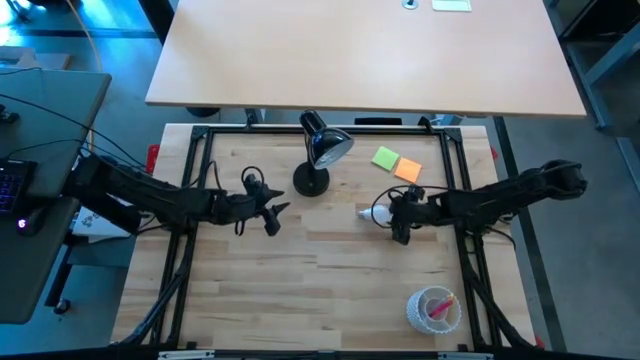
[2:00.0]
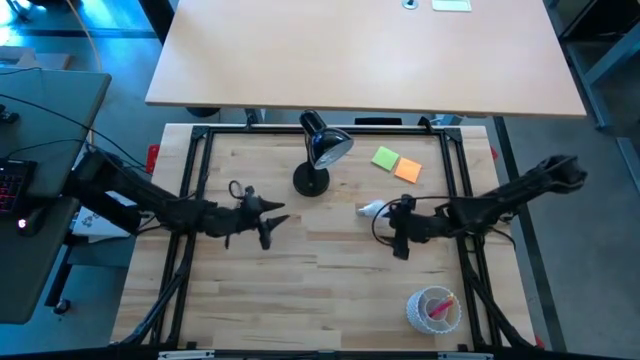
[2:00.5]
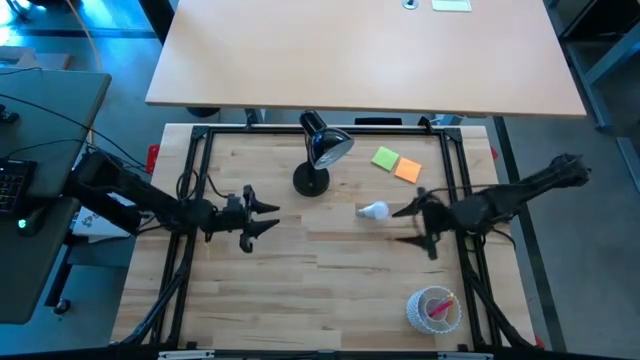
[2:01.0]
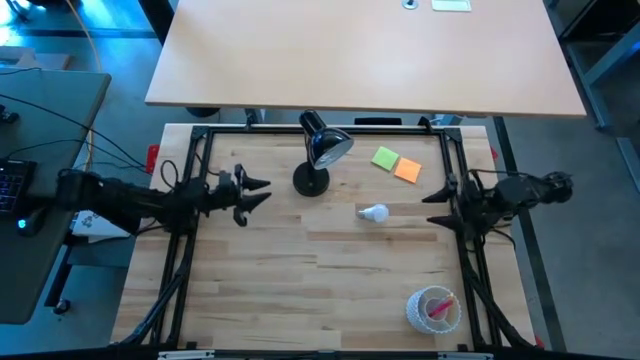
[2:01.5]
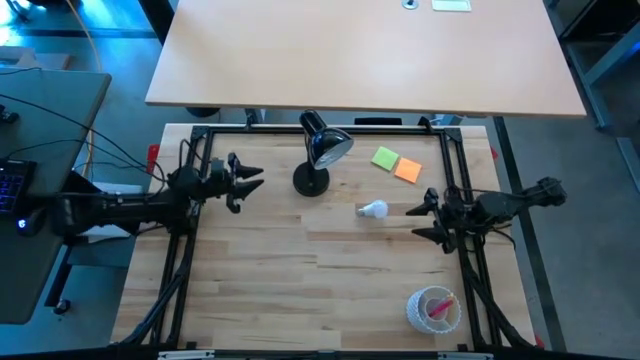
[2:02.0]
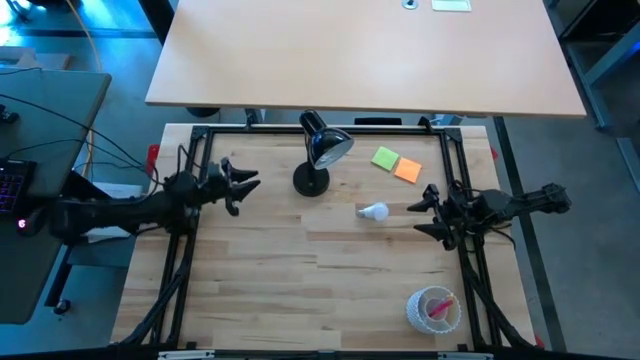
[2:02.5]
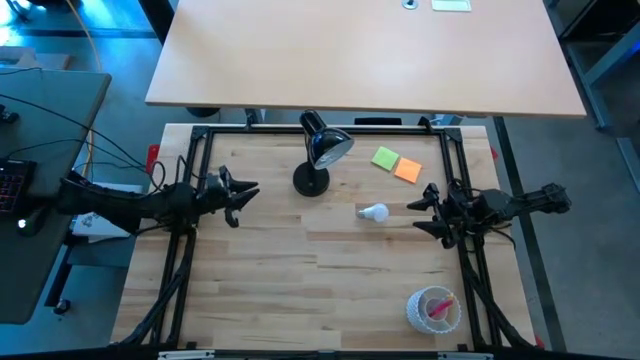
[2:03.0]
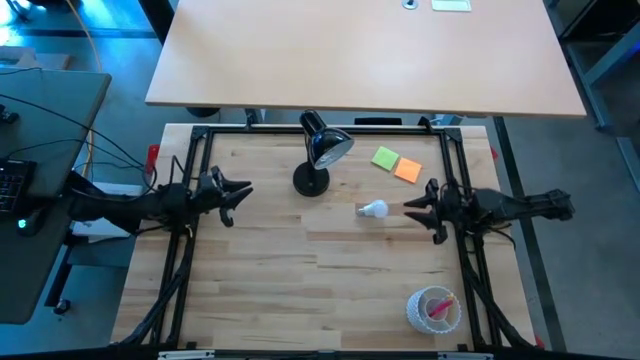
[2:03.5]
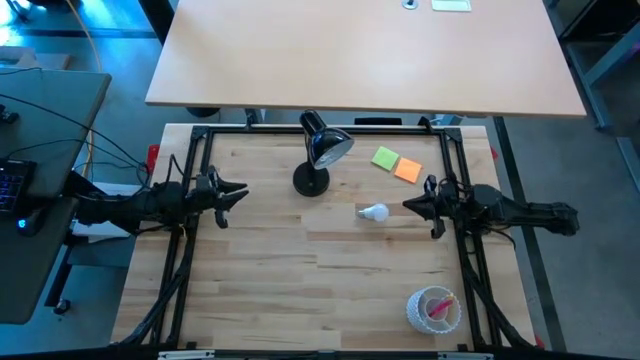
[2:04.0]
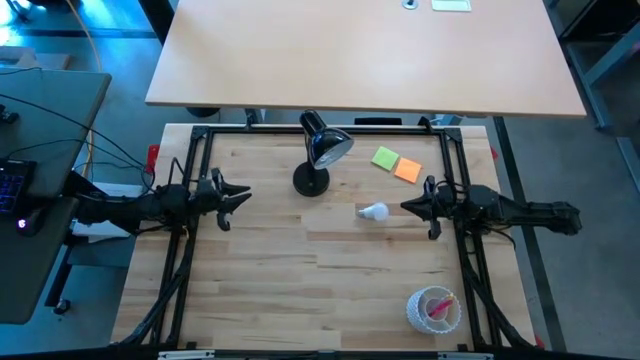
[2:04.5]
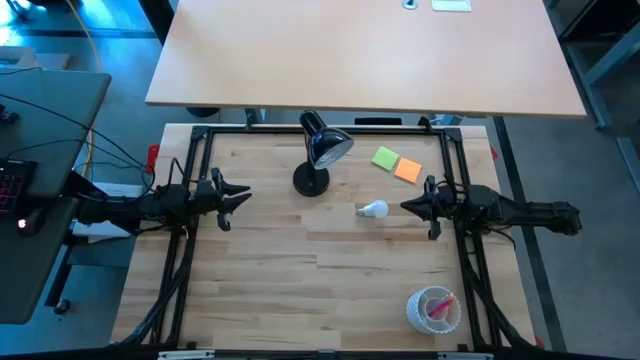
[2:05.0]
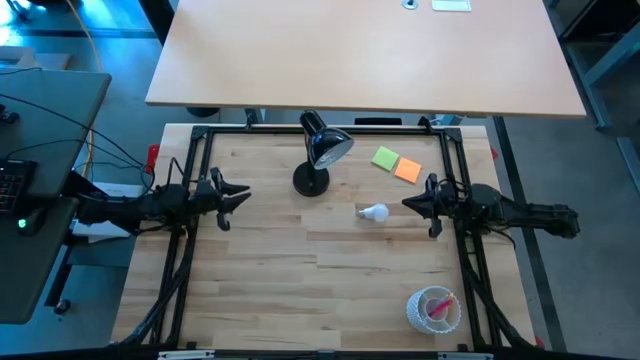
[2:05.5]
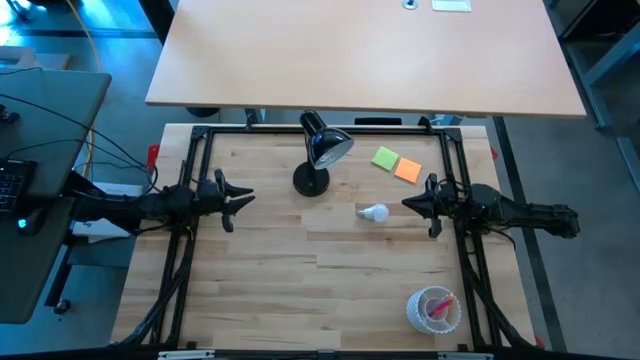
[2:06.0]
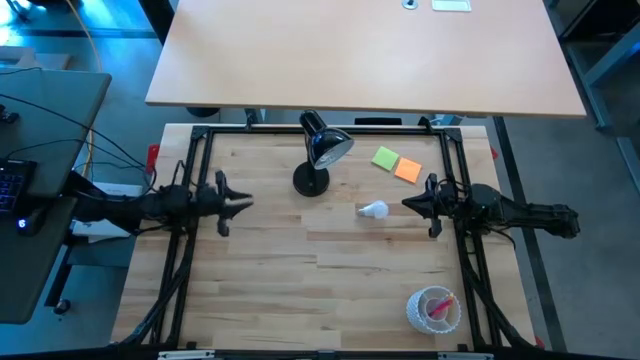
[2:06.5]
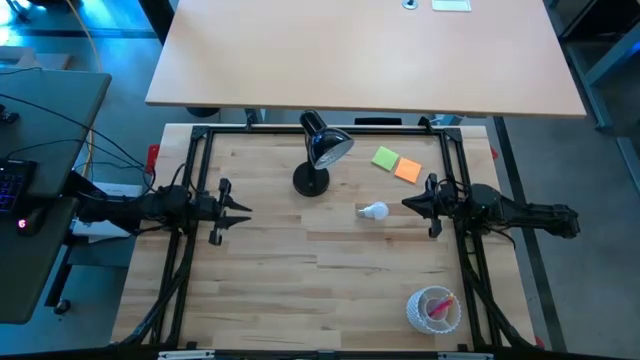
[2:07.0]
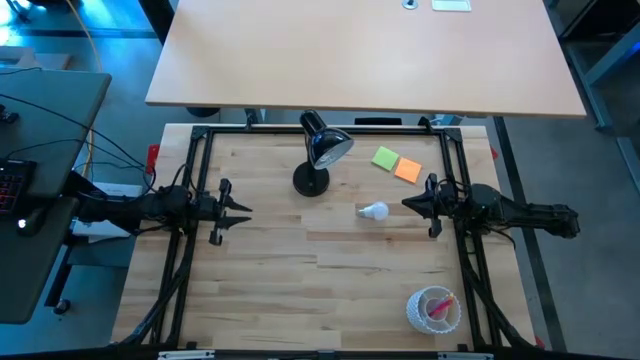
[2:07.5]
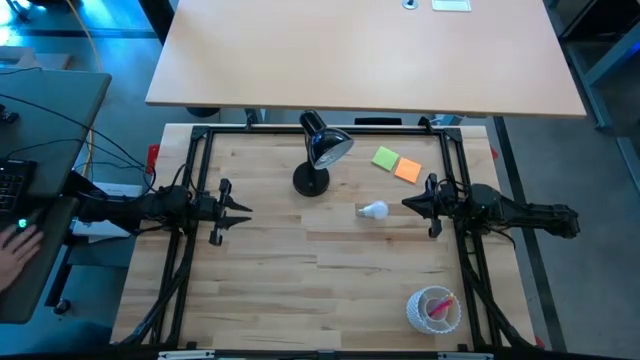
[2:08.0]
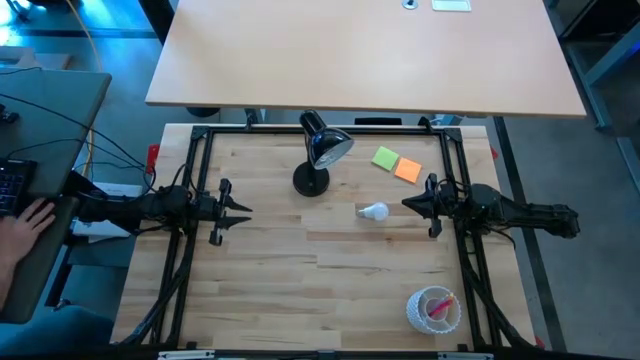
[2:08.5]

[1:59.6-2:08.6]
Task: Screw lightbulb
Return to Home Position

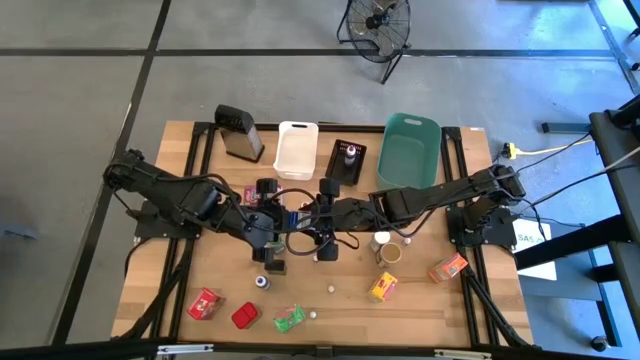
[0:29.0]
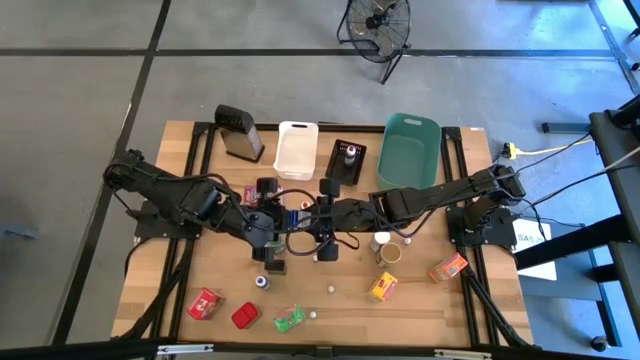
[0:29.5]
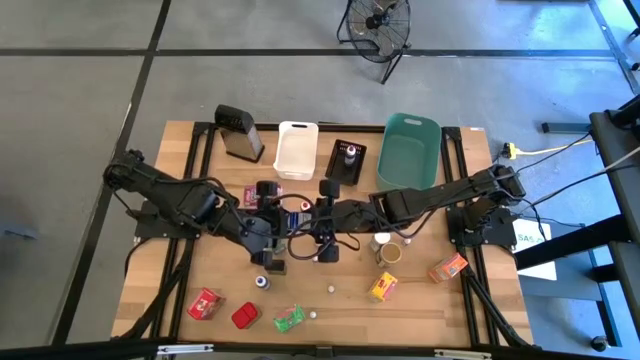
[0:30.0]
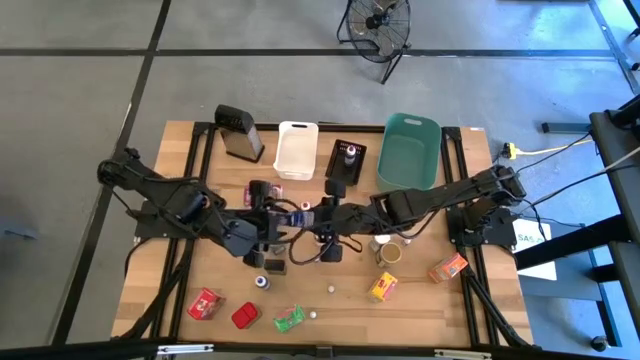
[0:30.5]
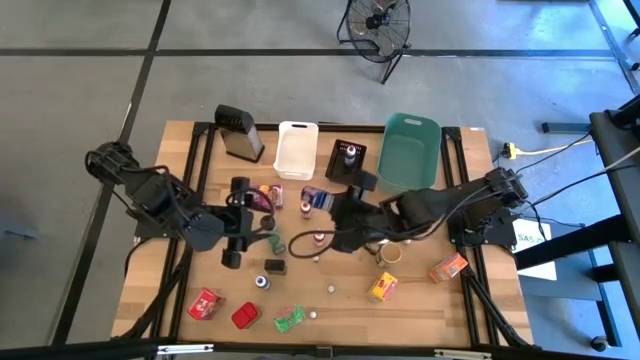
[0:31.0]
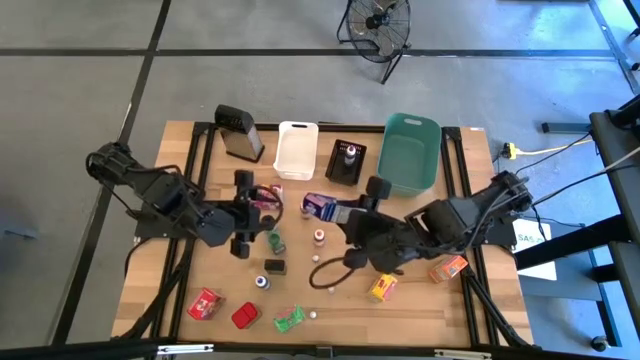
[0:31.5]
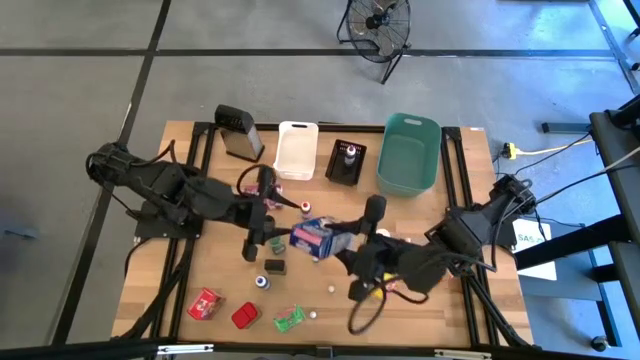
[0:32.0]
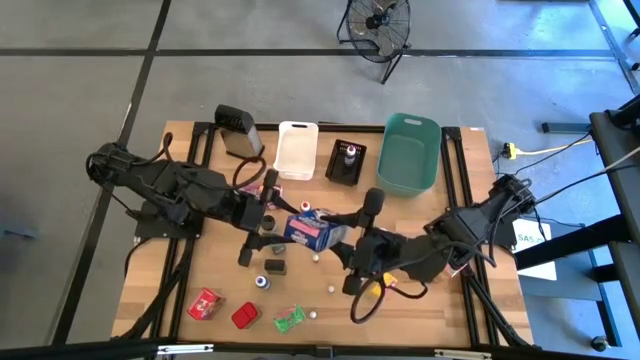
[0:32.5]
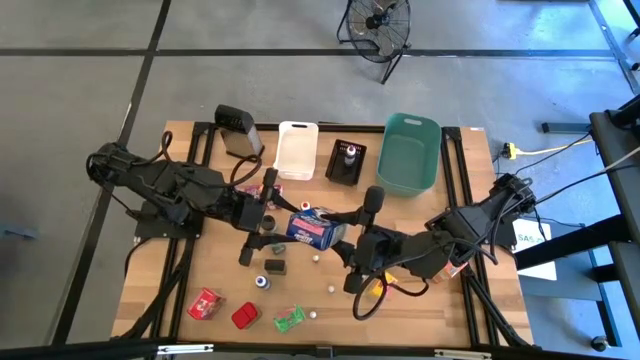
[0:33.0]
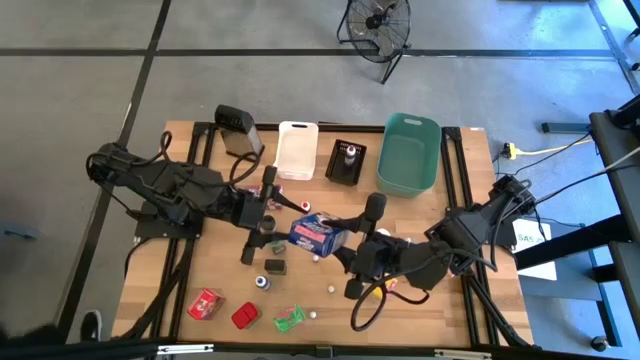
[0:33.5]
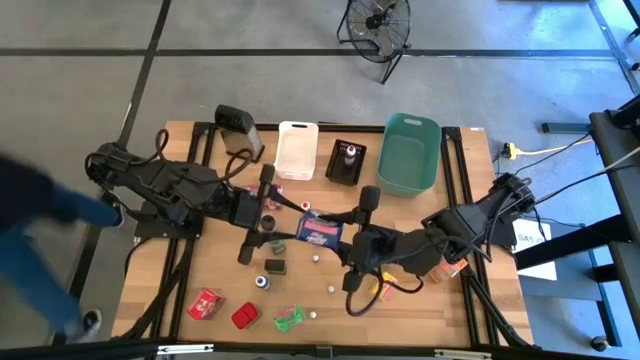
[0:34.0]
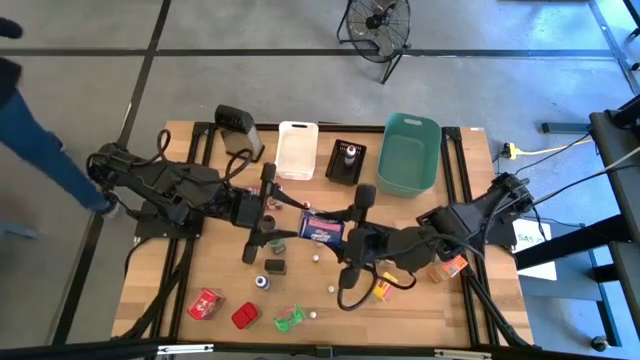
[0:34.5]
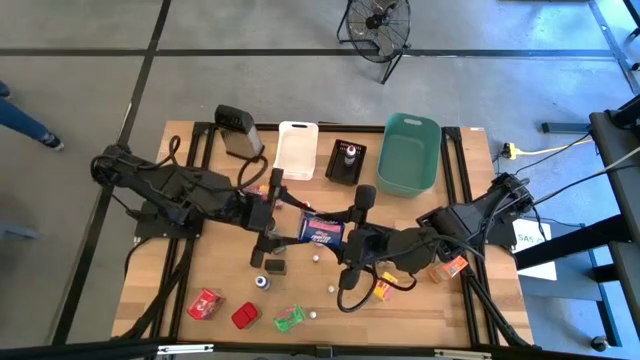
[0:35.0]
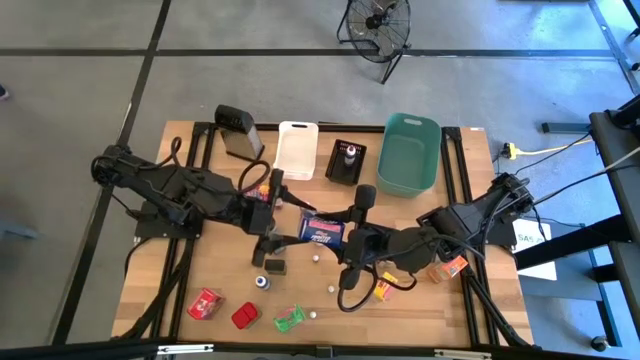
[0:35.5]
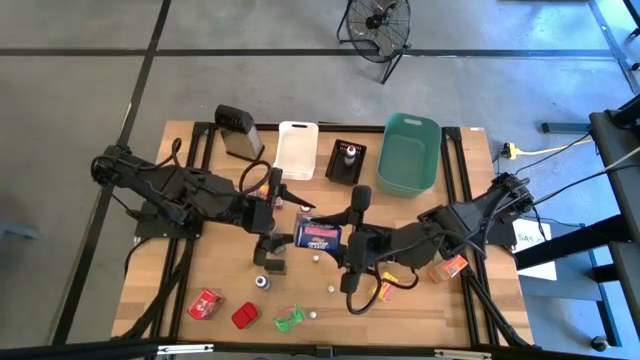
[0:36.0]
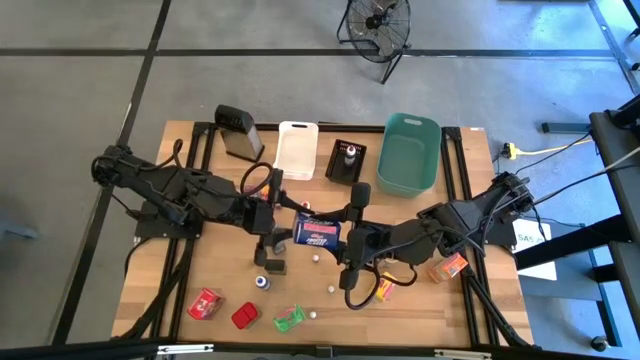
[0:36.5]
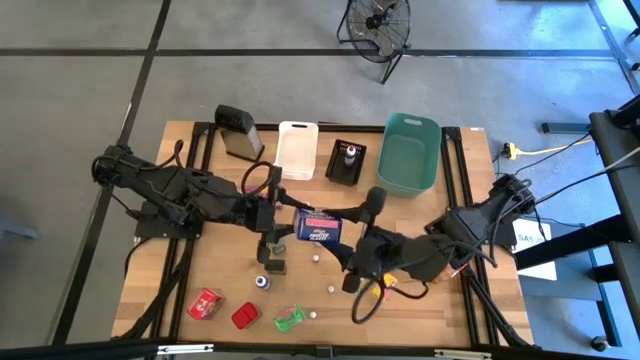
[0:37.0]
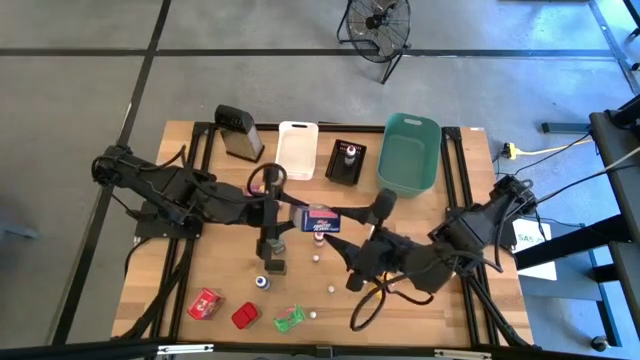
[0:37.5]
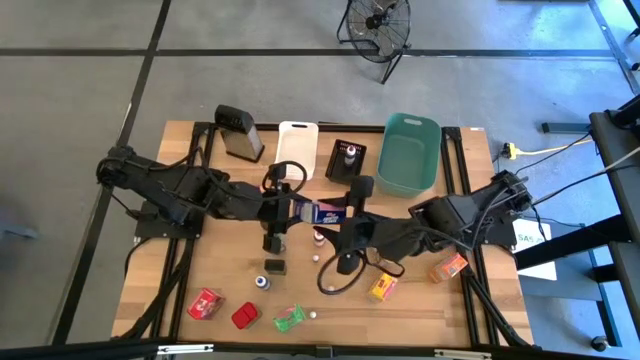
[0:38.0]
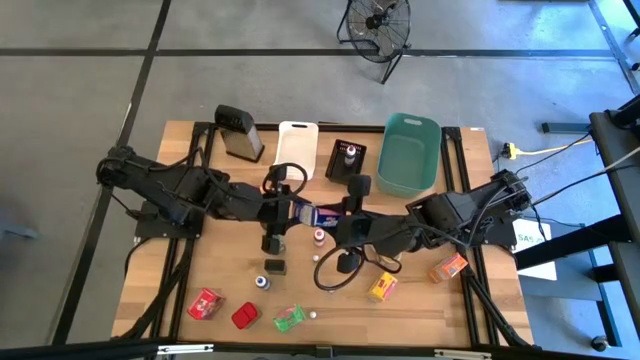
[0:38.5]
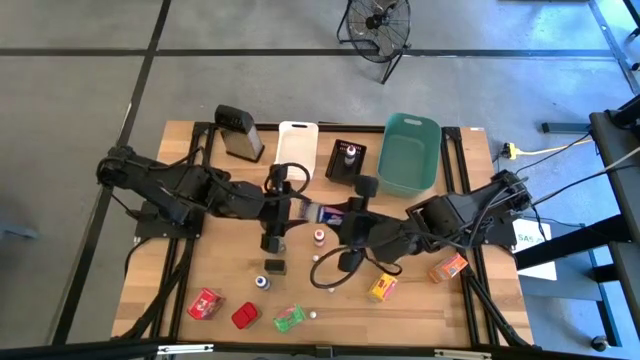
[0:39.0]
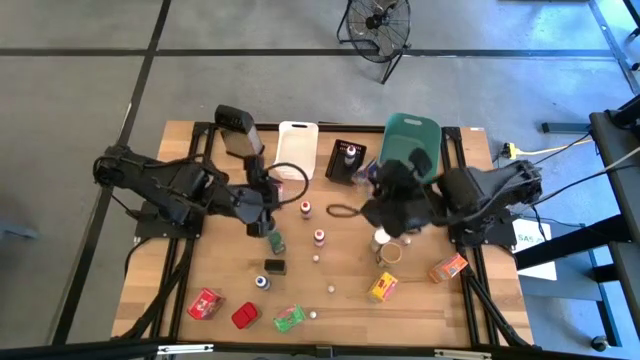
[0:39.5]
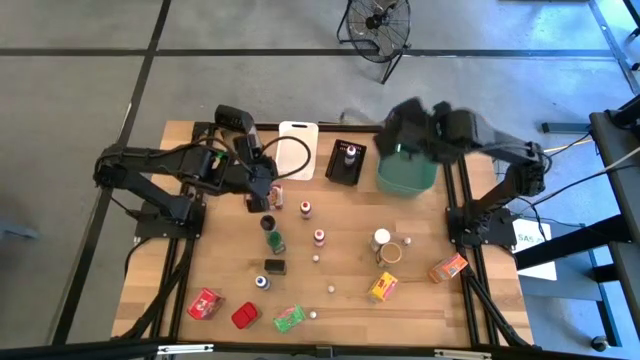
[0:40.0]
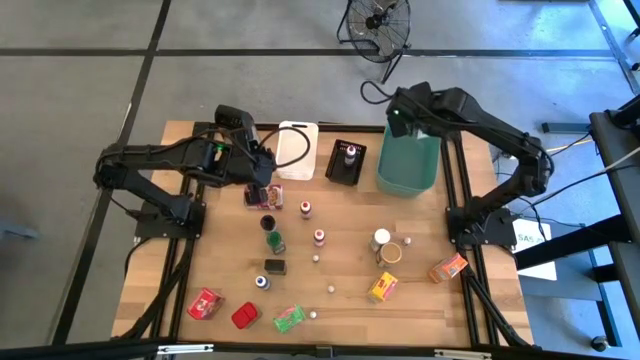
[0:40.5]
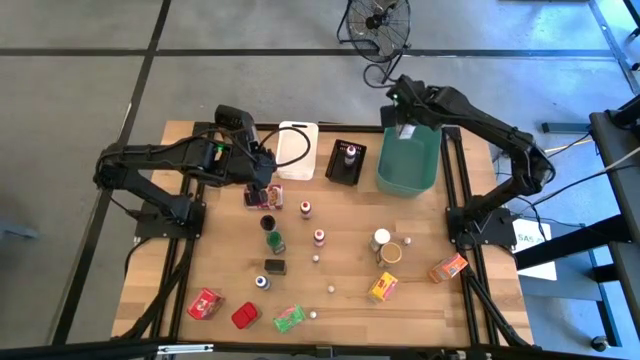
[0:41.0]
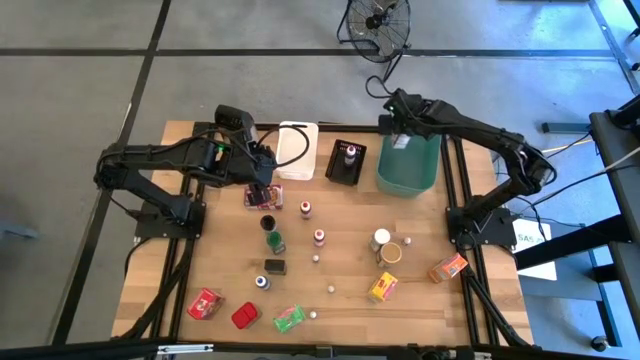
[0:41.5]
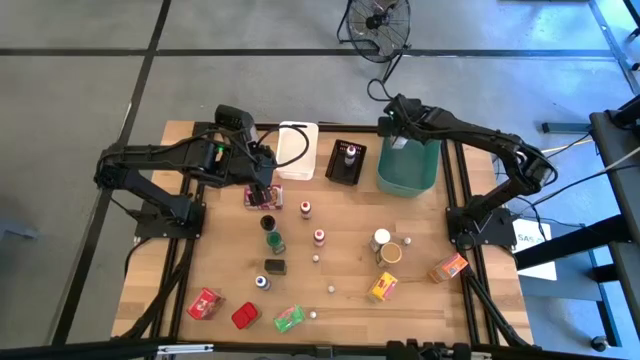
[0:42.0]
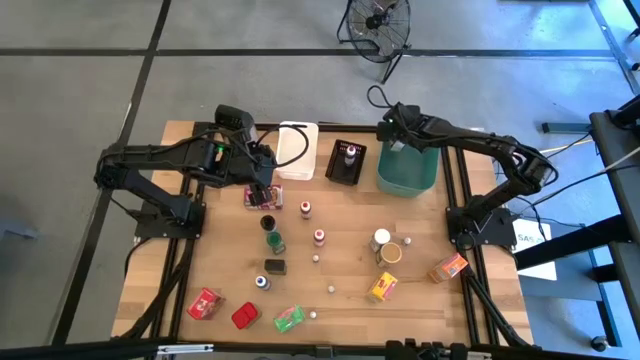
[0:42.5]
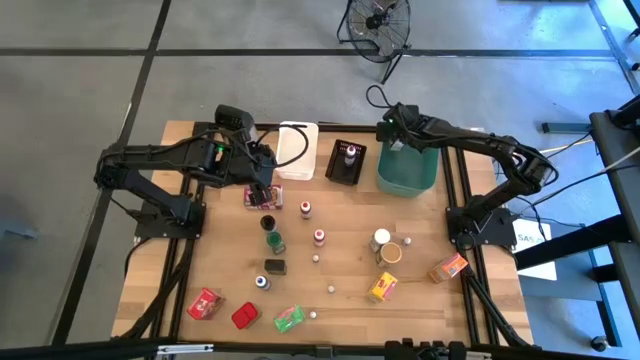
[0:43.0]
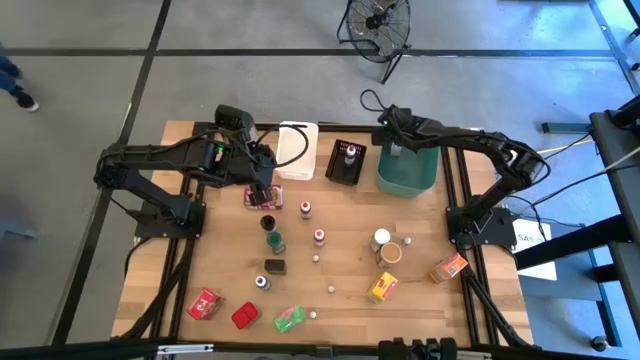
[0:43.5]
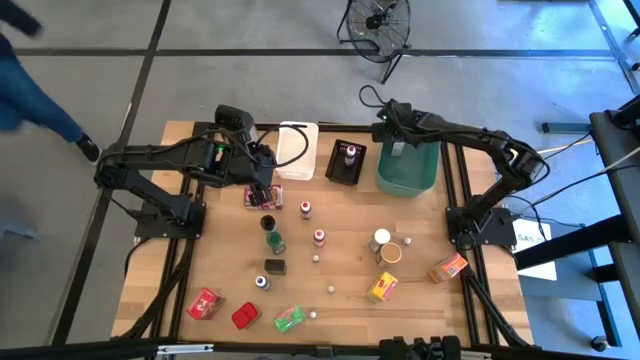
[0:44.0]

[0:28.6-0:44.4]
Task: Pick & Place Kitchen Items
Put the blue cereal box into the green bin
